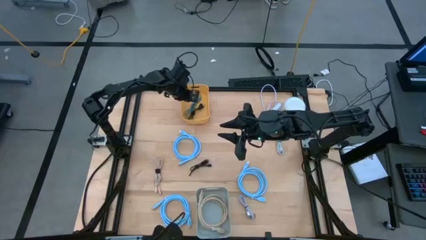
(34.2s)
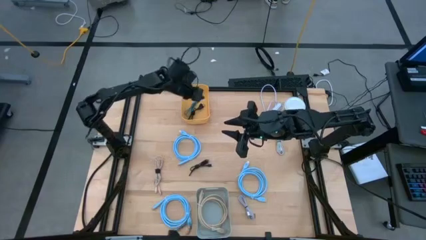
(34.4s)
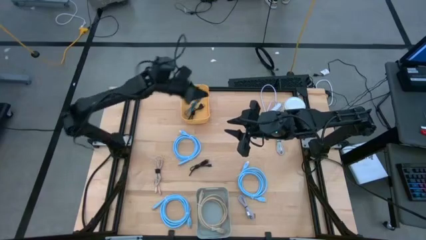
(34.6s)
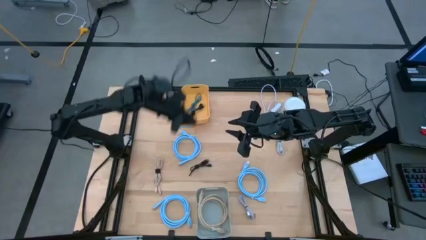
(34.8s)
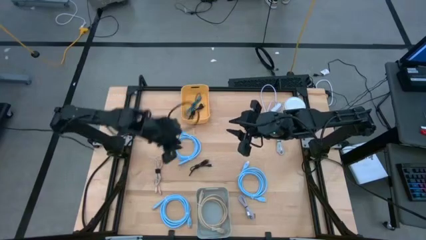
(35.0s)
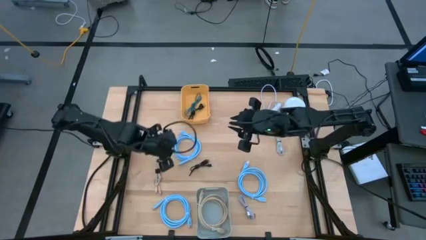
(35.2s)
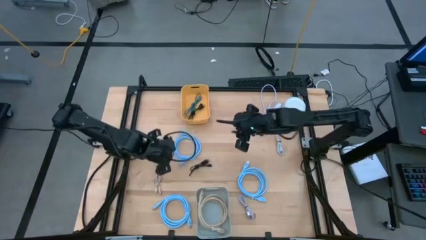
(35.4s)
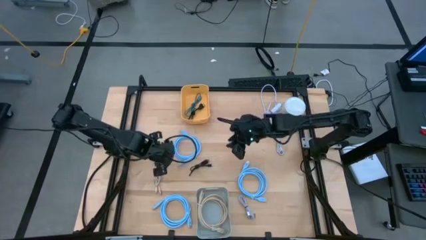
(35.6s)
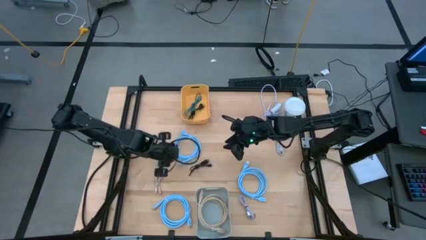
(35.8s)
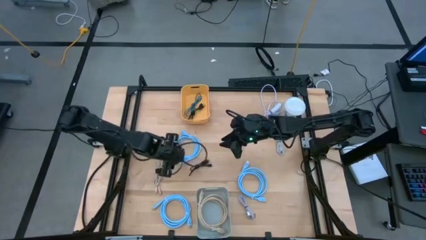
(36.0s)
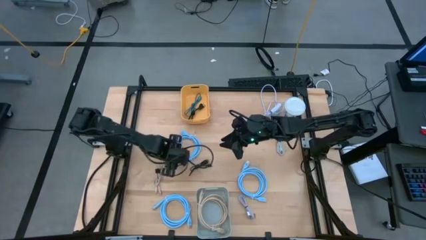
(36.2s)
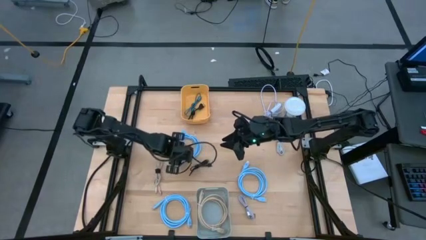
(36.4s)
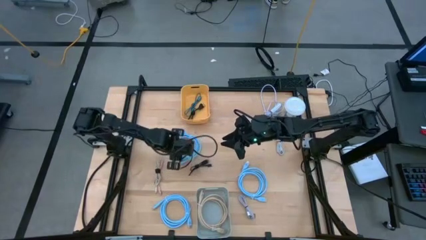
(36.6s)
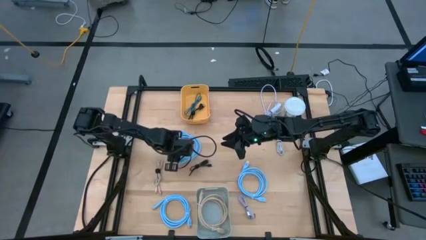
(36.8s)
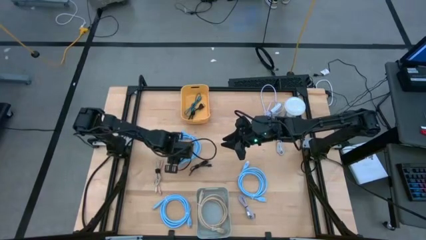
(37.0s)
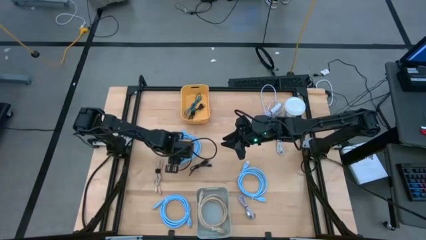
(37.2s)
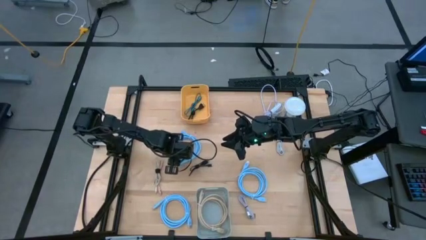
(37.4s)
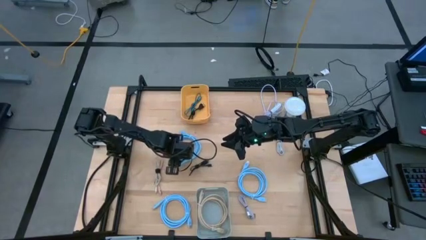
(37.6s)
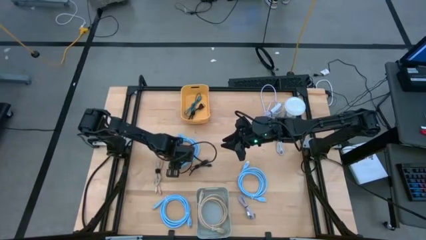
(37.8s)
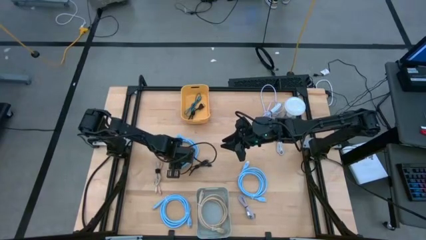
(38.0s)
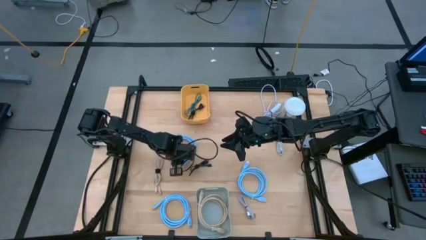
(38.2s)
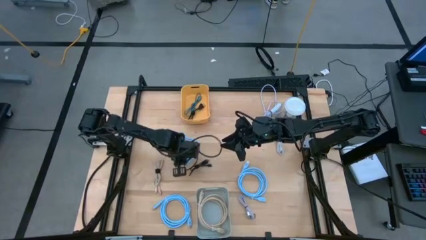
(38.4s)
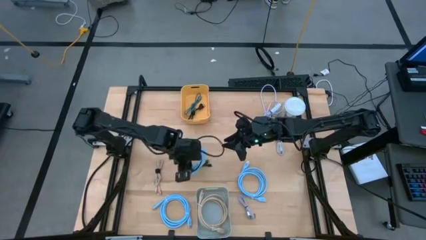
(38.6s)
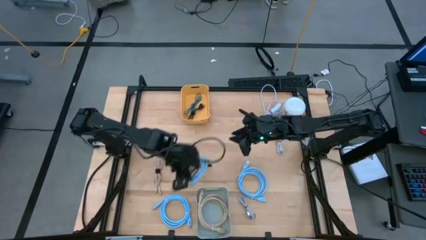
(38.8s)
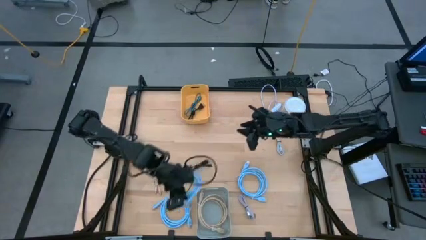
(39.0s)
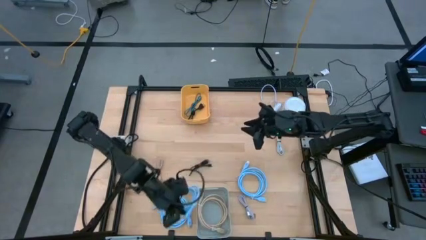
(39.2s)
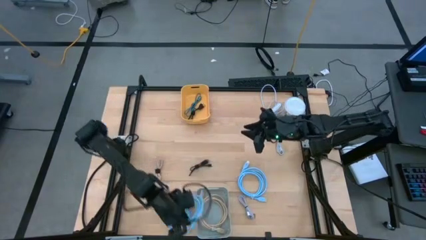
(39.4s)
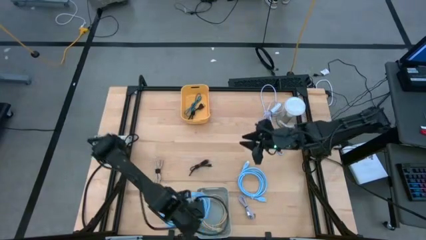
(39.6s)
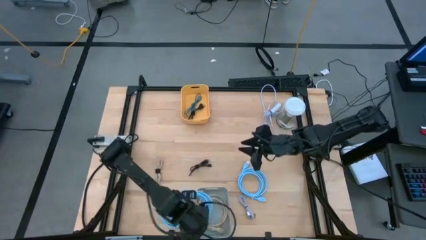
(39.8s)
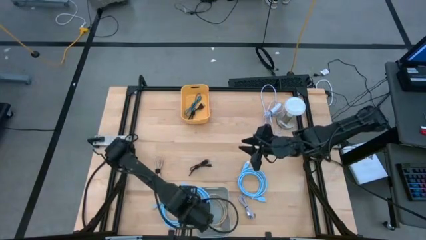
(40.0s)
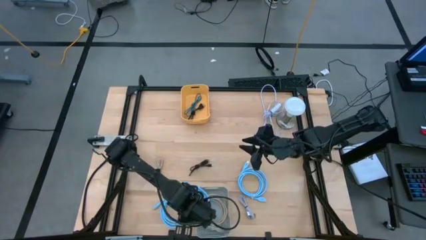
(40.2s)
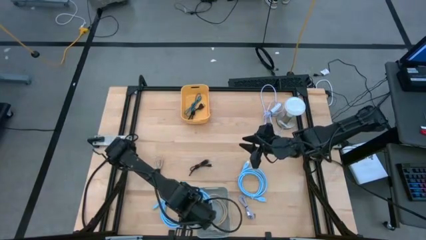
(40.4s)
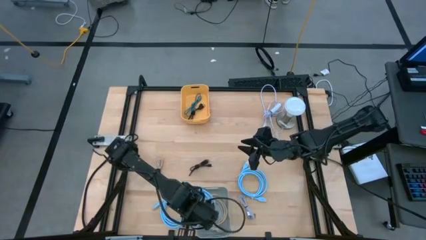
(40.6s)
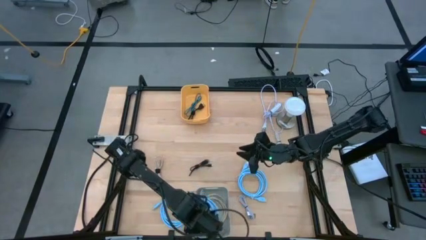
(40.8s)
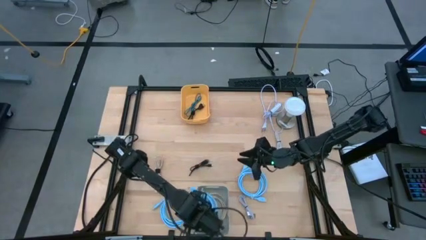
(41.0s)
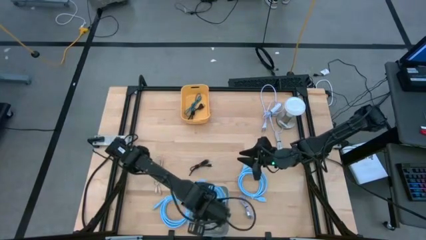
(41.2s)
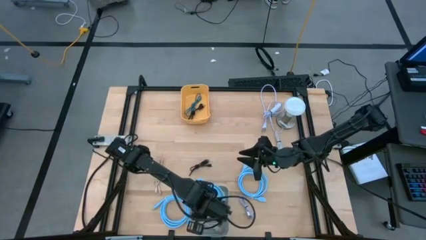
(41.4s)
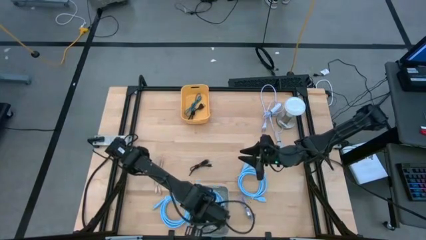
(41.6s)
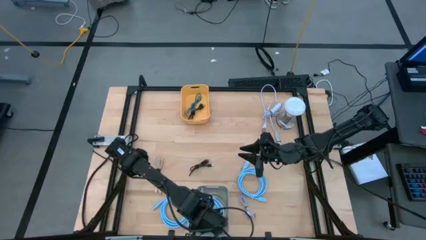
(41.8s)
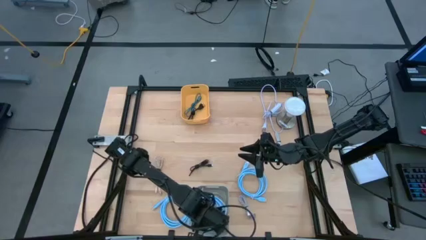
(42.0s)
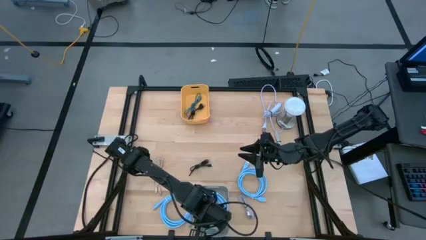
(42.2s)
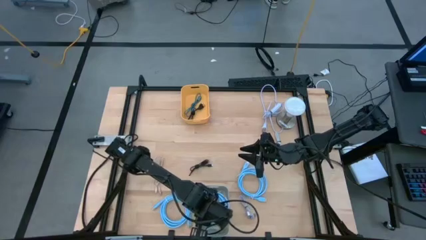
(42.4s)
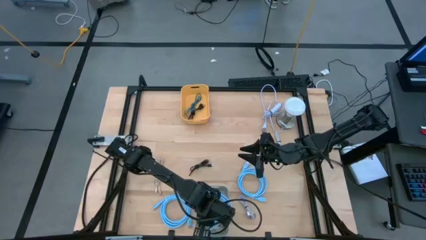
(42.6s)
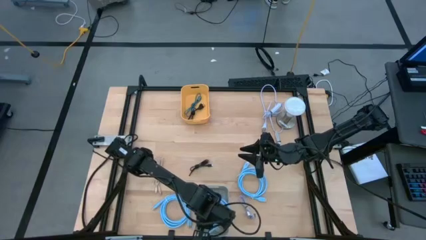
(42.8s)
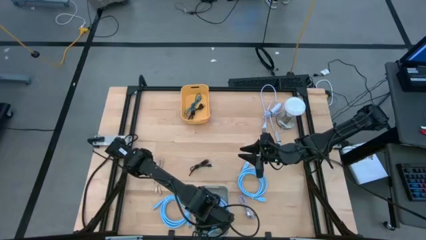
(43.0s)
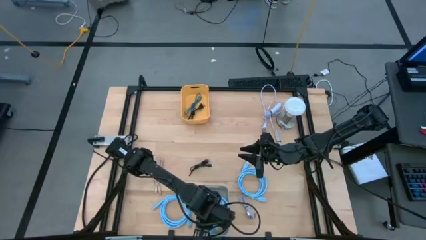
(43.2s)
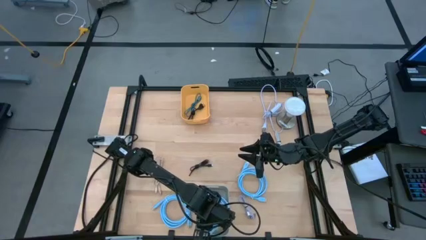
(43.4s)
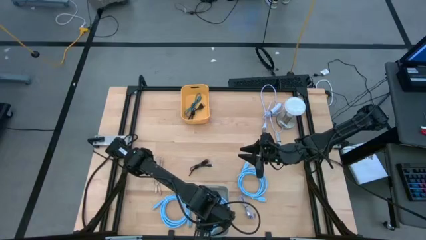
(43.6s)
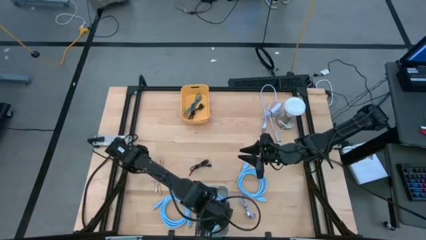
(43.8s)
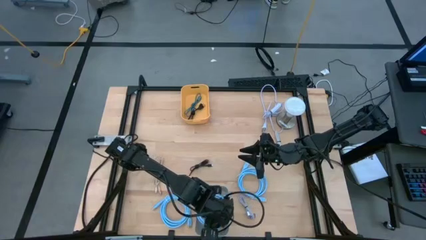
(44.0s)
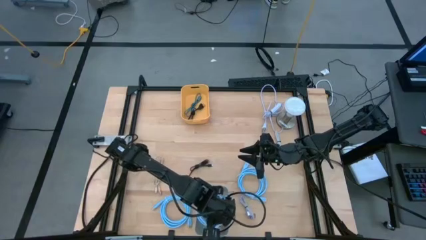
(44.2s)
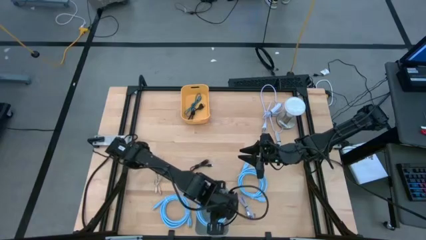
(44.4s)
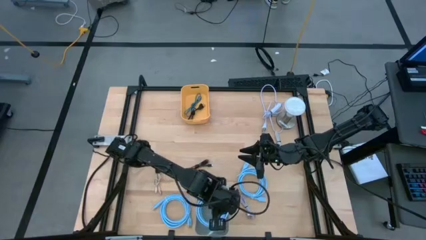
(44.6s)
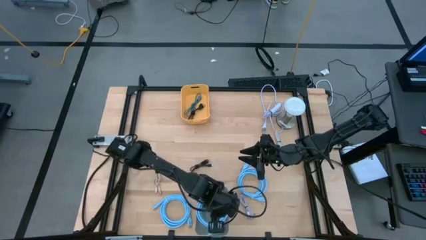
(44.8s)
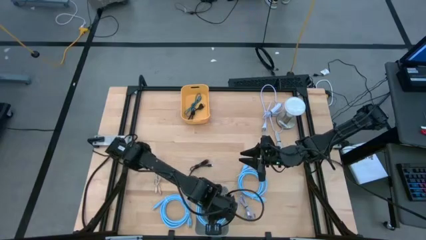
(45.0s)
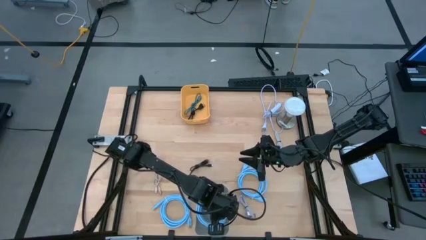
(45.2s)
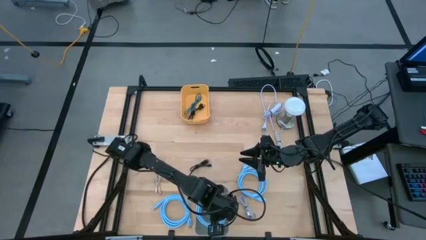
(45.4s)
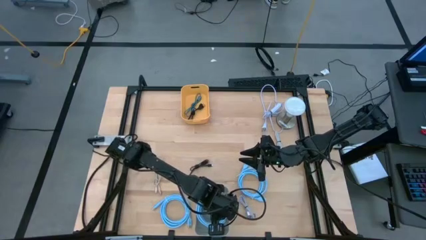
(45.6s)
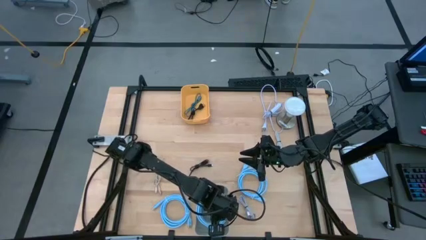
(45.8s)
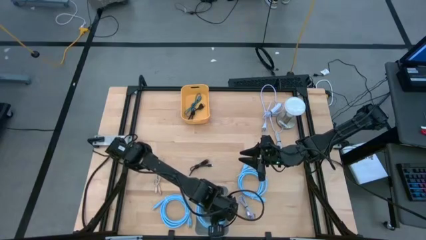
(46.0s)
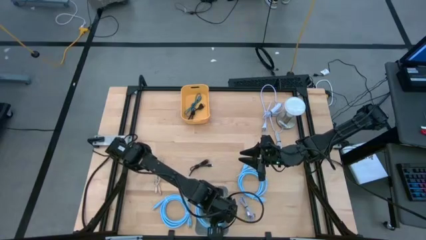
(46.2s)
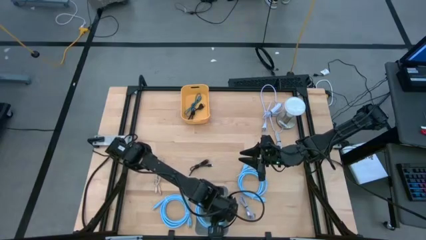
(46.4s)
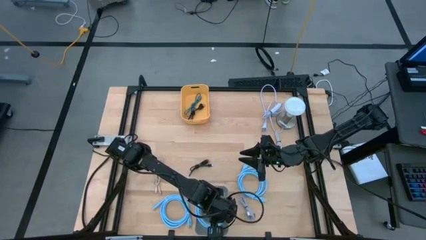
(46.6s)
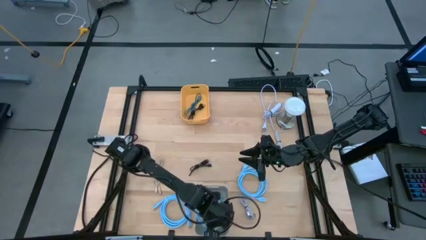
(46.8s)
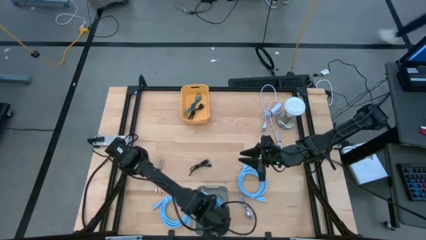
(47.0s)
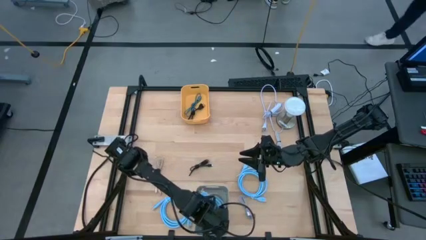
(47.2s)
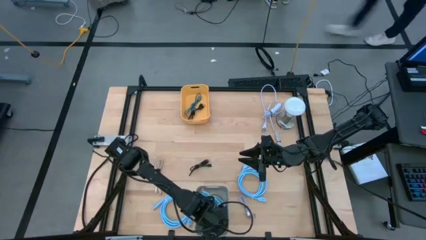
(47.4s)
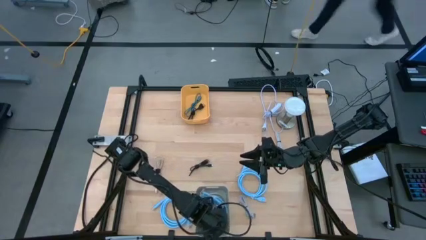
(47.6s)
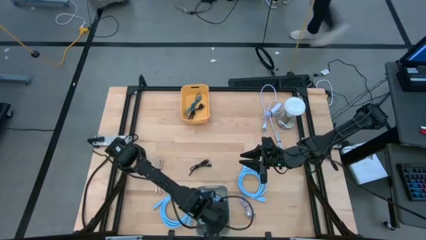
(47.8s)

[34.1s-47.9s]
Task: Pick & Place USB Port
Put the top blue video cable into the gray bin

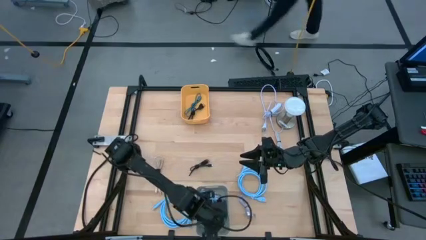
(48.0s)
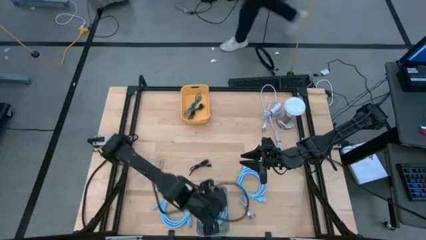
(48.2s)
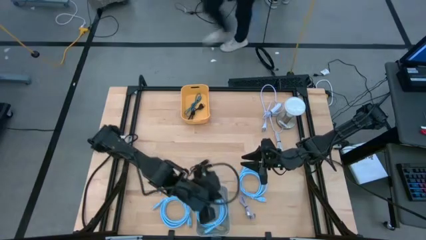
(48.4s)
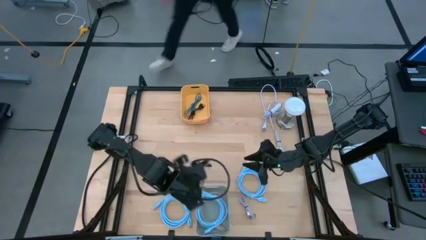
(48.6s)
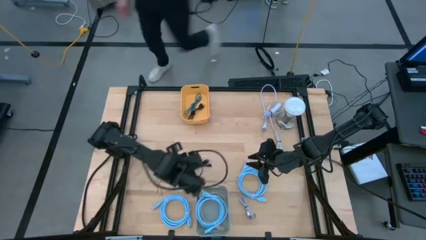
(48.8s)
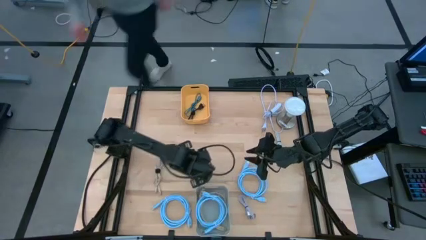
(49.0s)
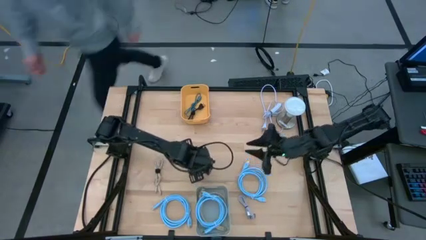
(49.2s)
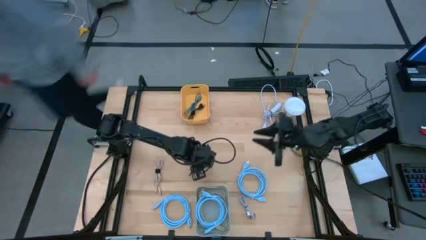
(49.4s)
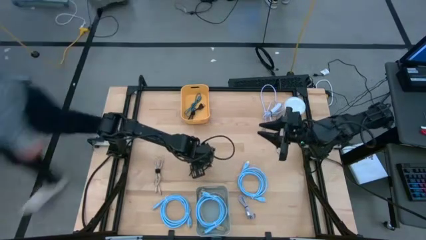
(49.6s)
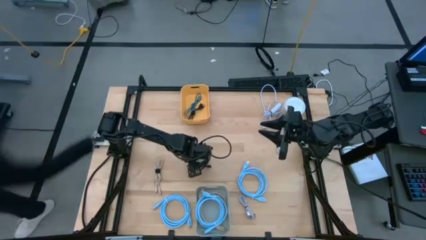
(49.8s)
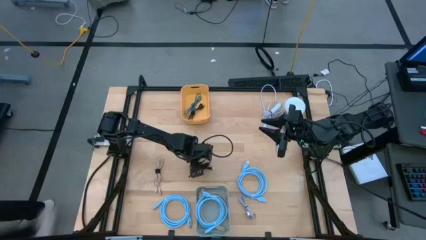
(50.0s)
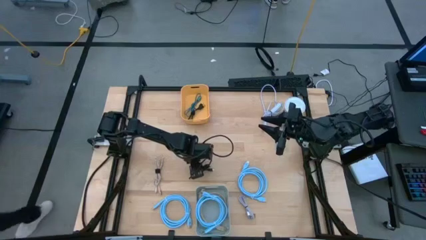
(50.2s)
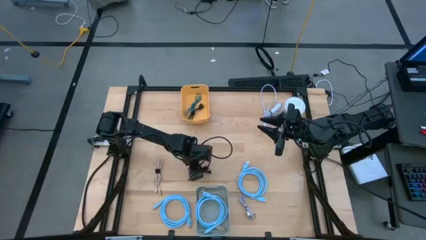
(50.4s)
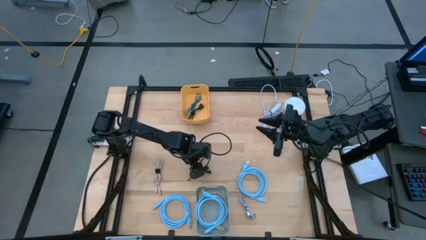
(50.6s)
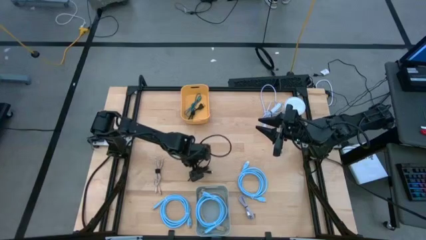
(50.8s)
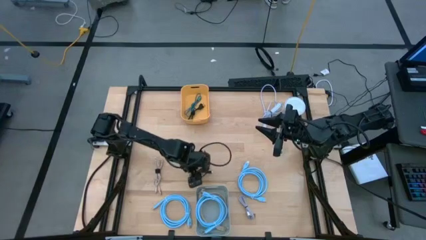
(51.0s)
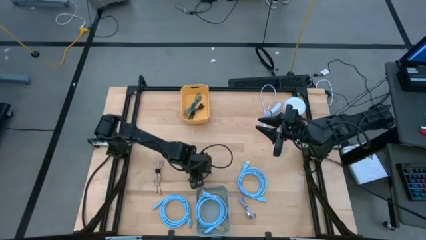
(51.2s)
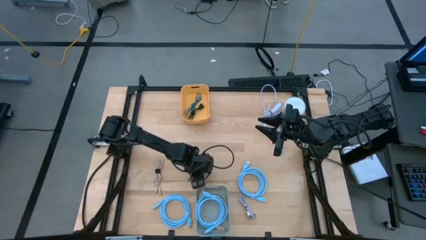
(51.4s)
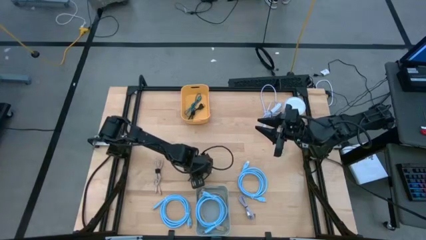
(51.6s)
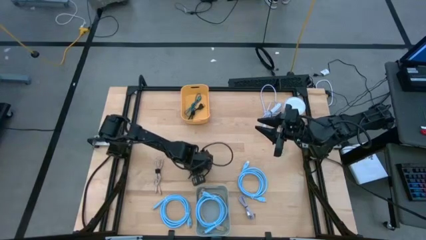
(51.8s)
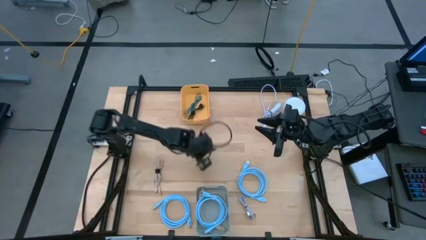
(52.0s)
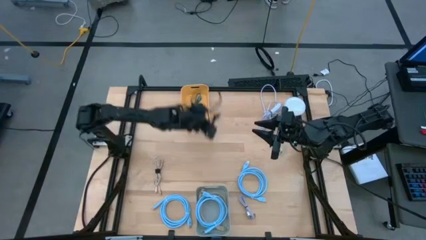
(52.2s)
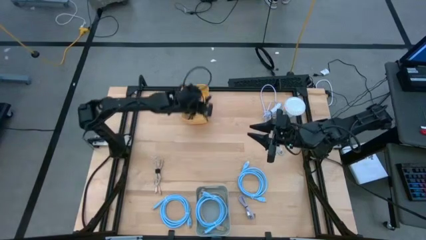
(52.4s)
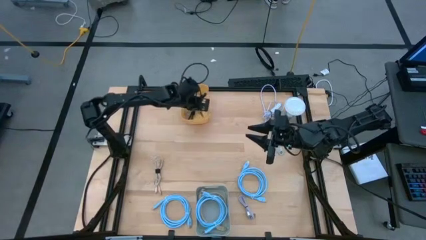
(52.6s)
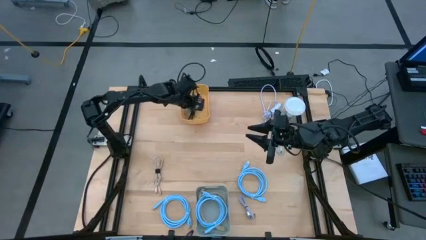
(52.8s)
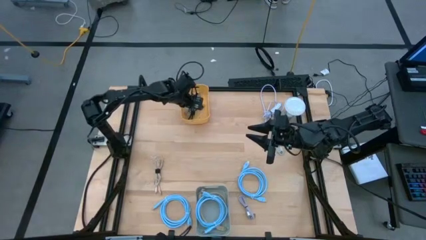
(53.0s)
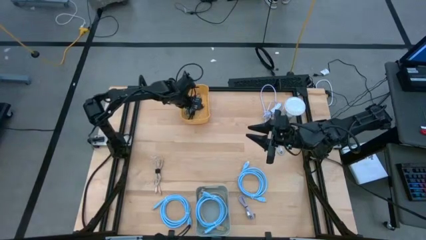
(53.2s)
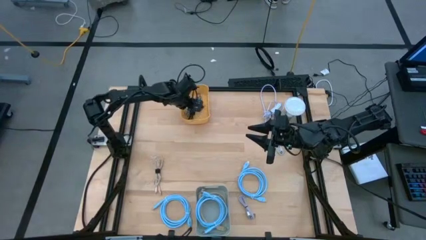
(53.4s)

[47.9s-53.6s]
Put the black charger cable into the yellow bin
